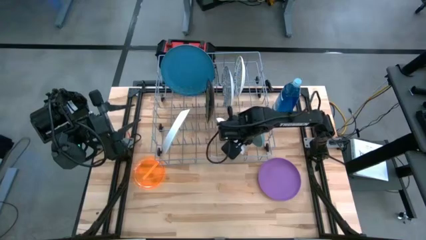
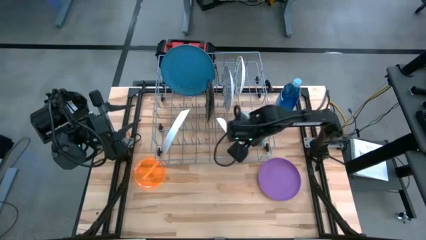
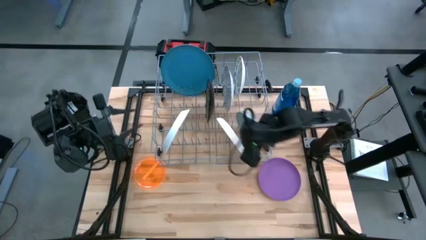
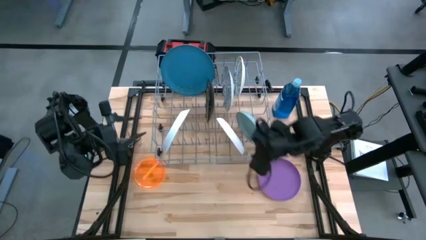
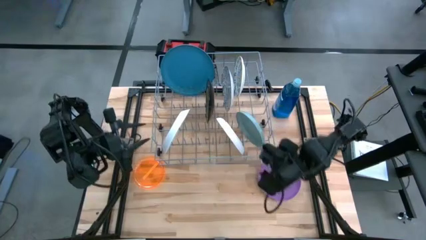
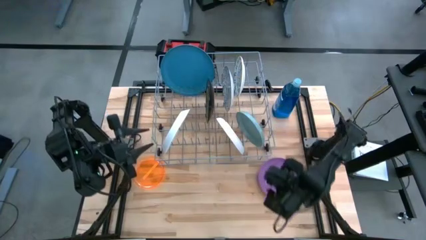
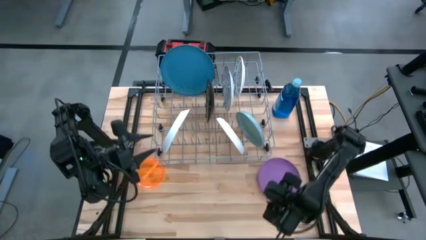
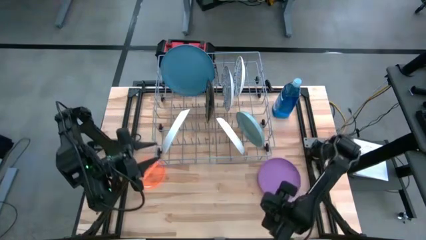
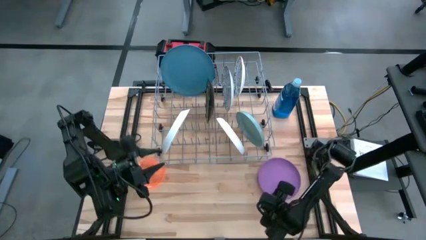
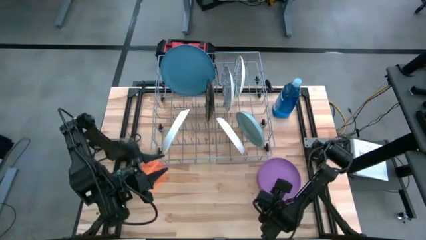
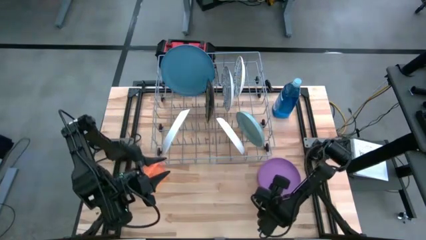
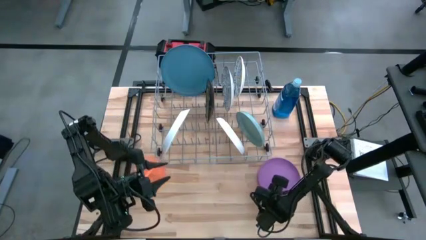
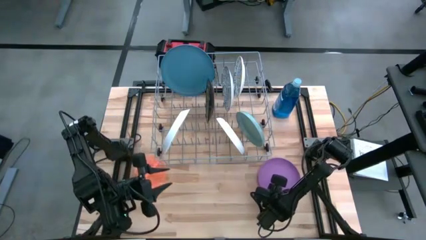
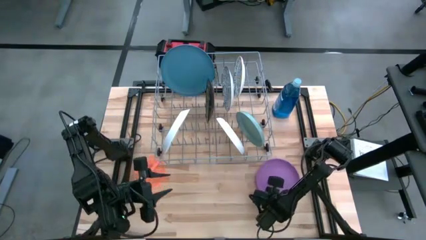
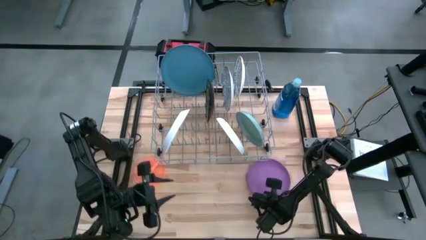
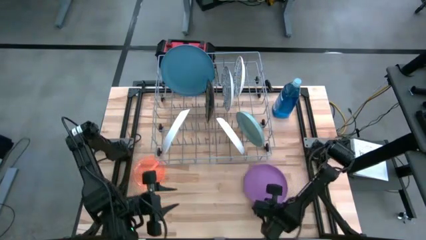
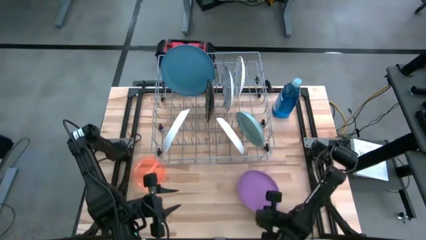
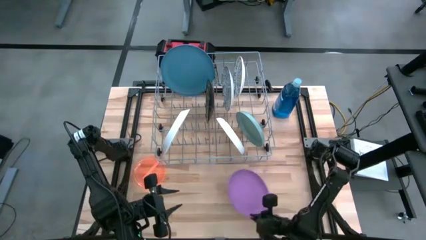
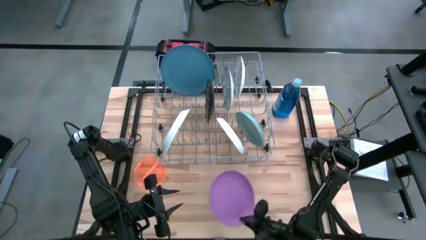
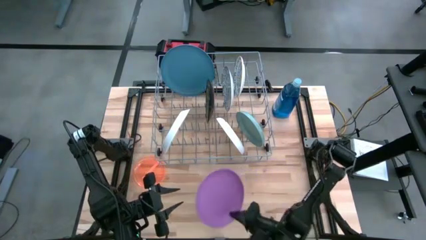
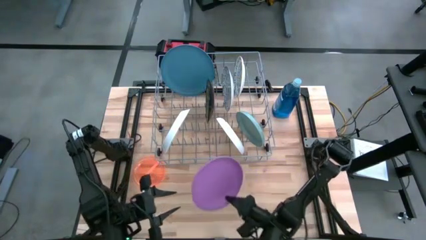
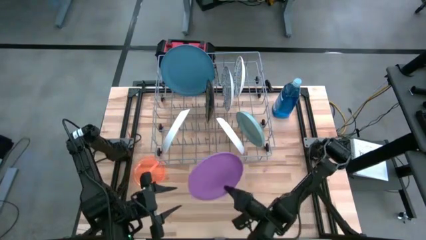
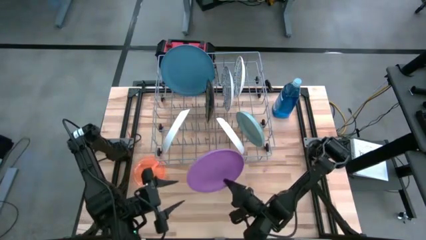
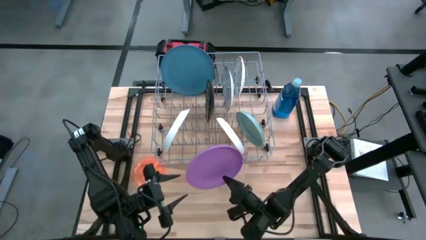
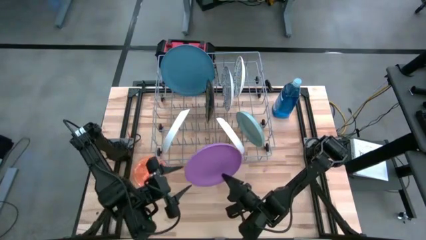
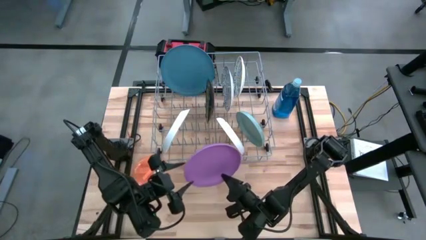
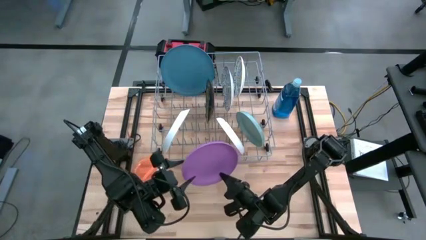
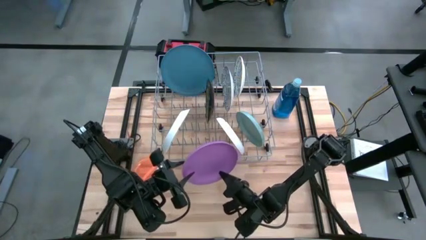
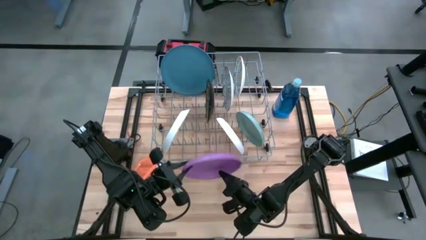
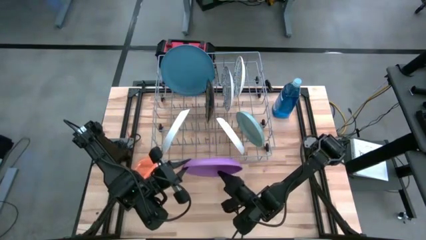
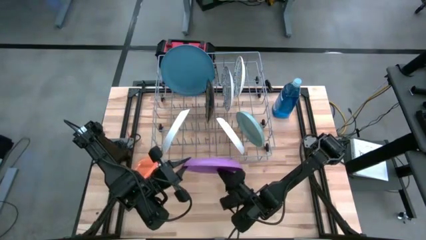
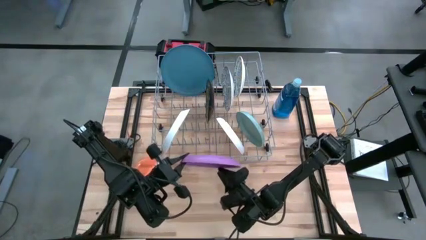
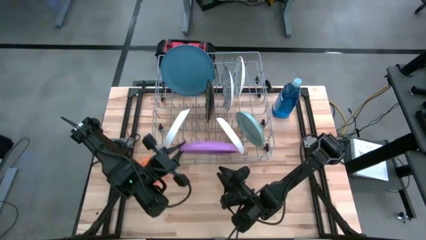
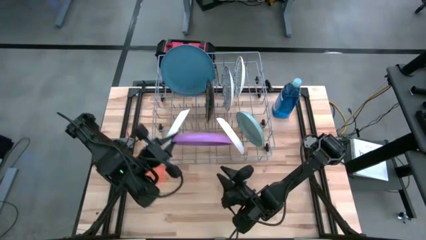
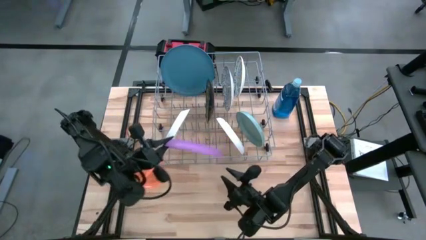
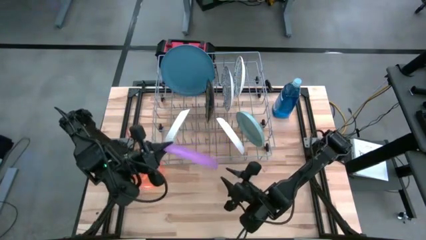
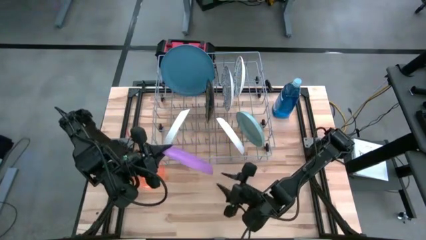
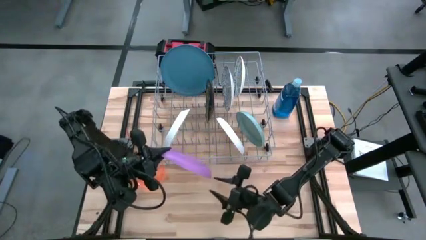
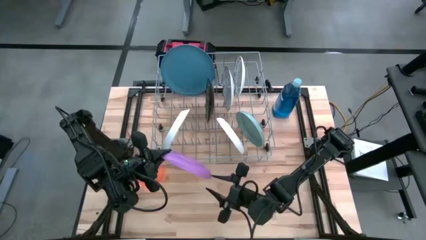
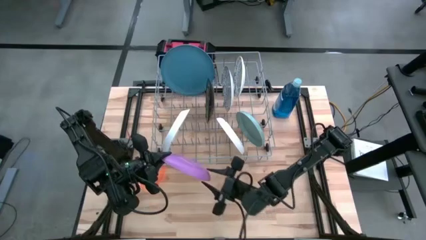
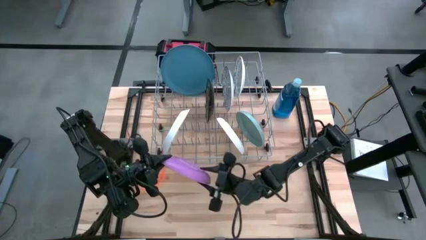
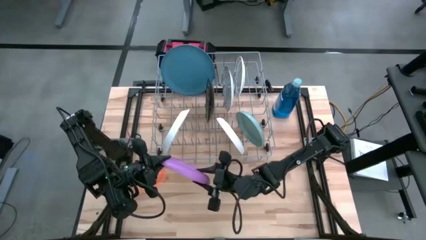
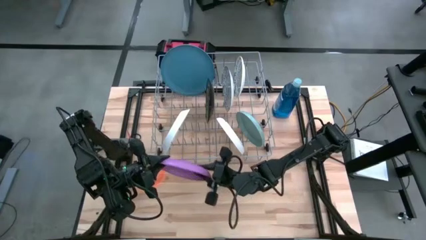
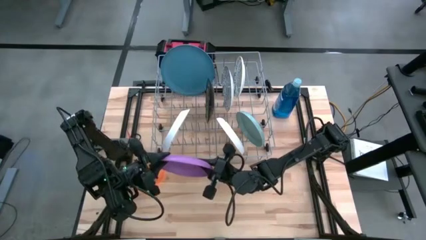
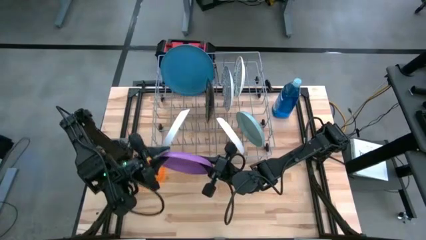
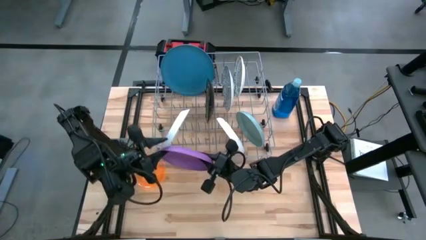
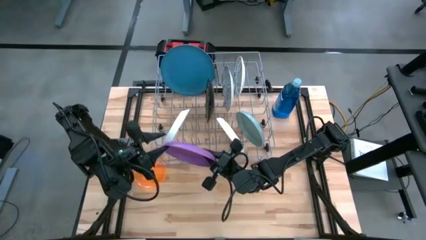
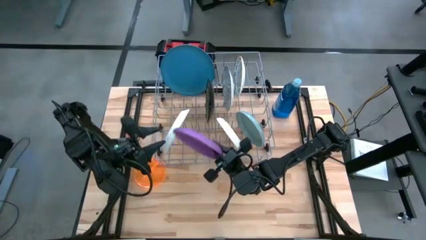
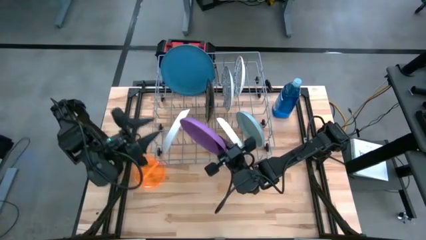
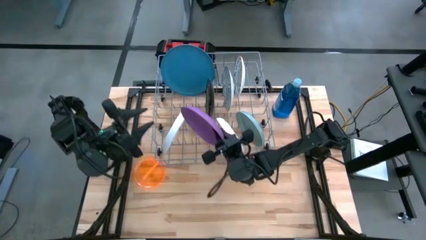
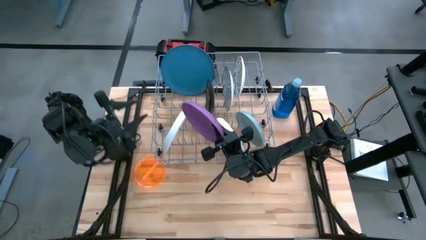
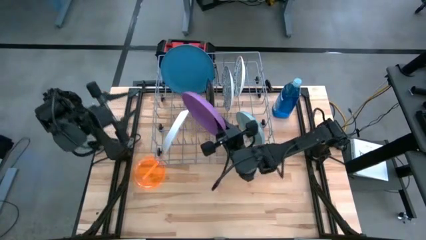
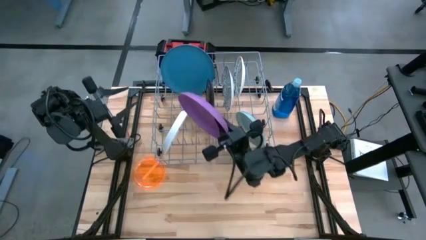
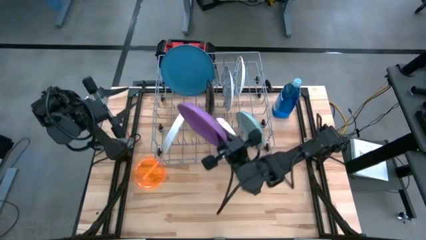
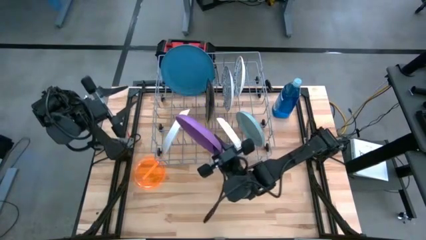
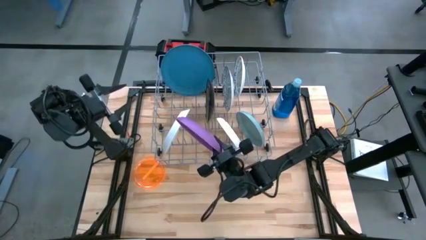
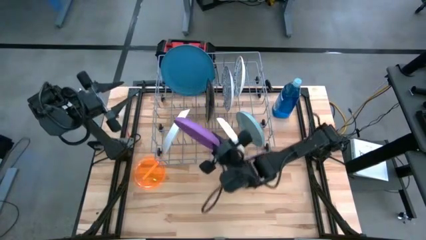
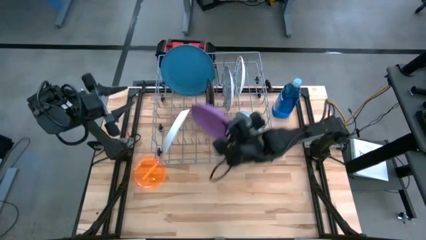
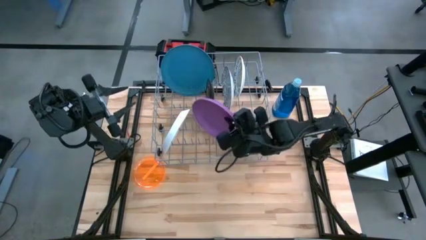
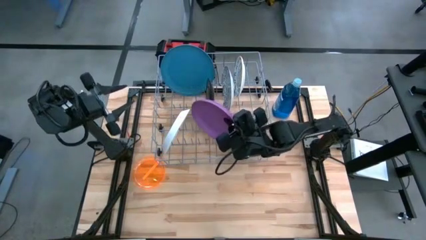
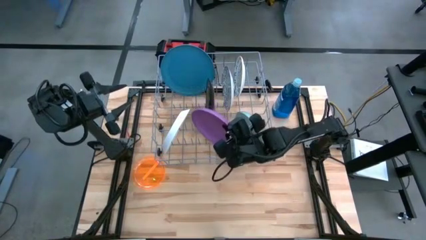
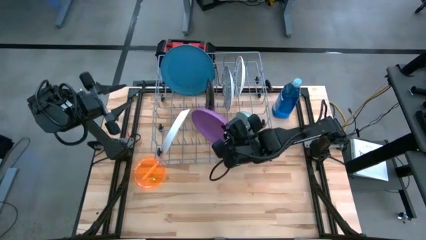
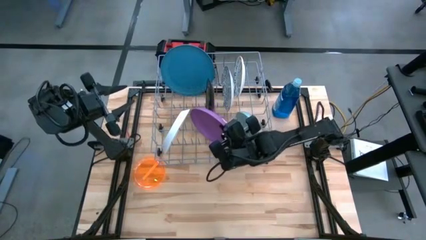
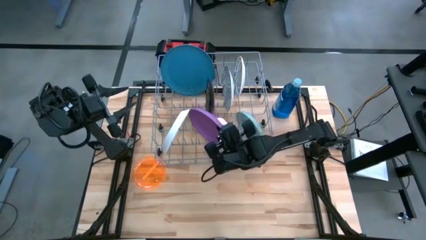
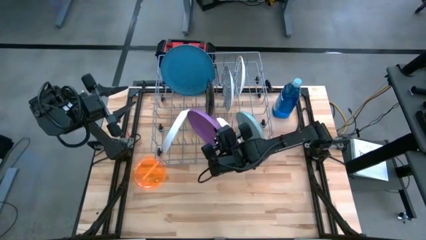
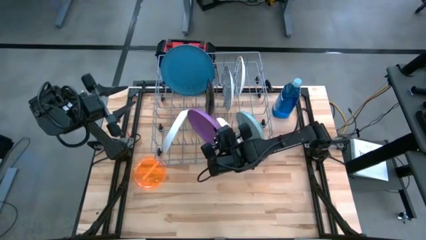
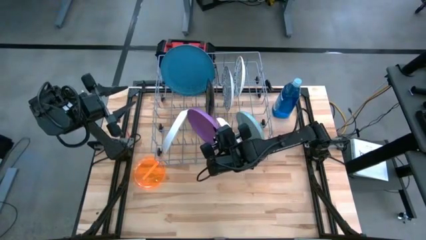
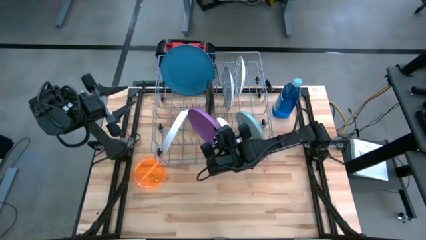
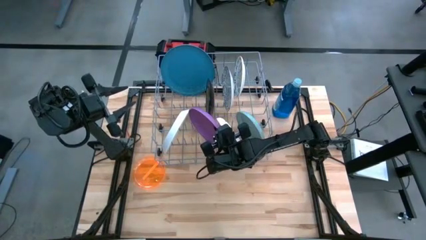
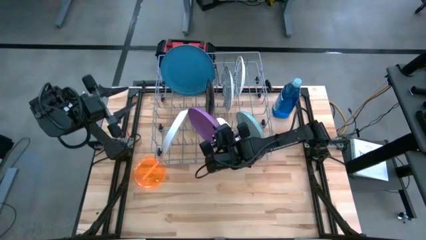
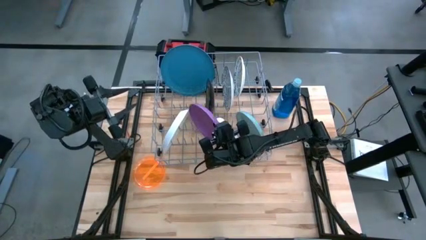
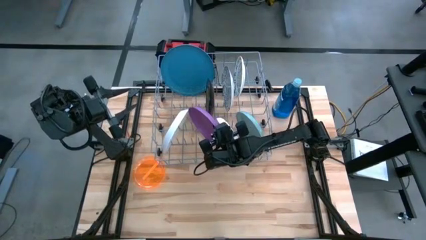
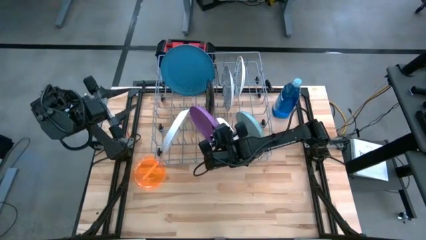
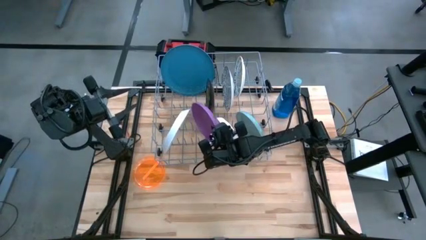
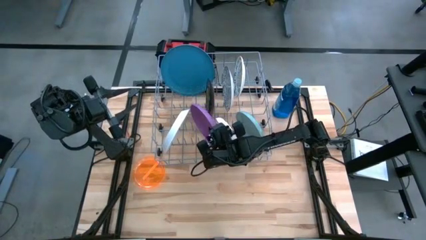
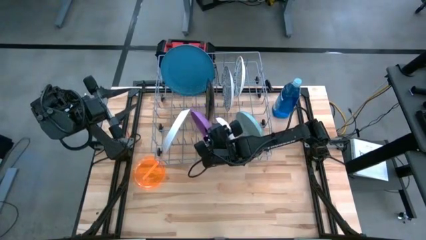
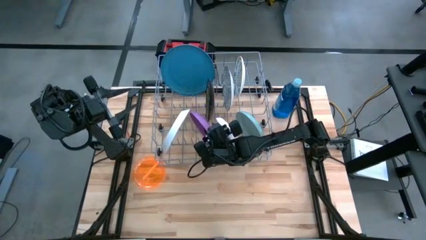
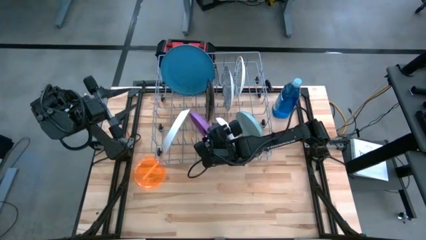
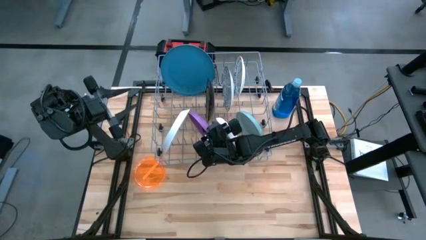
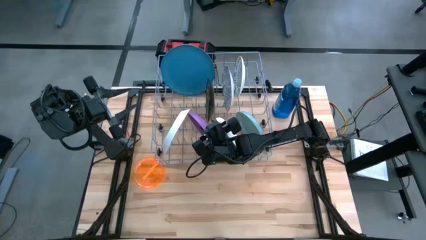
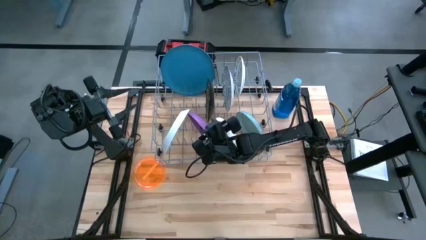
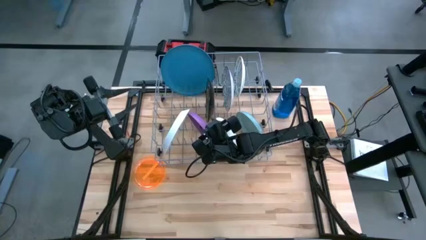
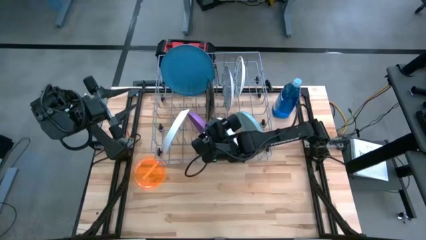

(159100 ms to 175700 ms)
Task: Sort dishes
Put the purple plate in the dish rack
